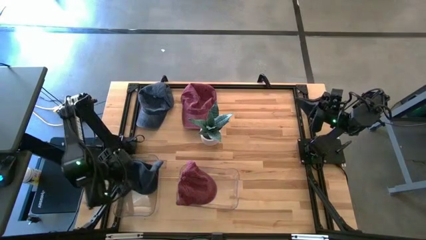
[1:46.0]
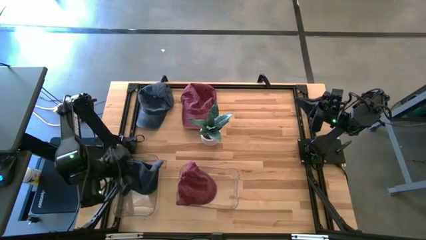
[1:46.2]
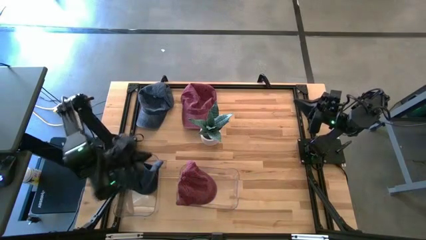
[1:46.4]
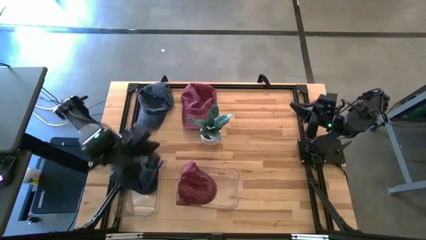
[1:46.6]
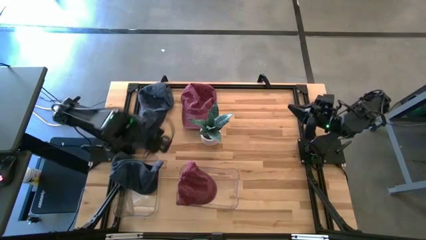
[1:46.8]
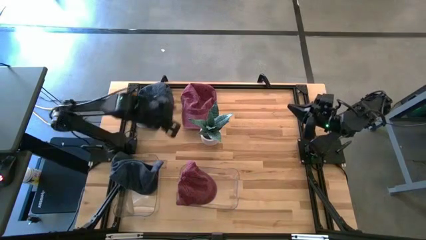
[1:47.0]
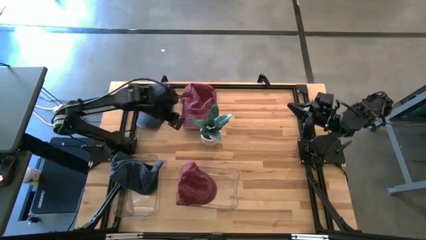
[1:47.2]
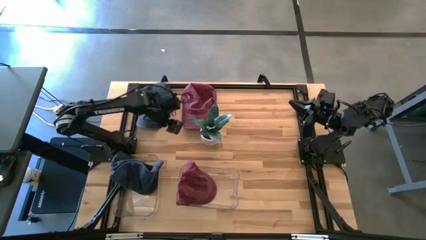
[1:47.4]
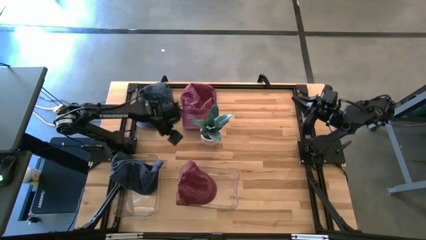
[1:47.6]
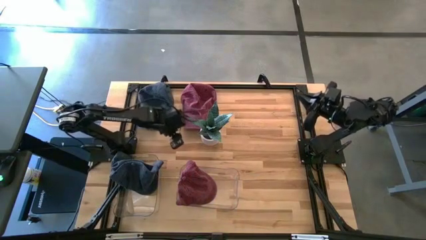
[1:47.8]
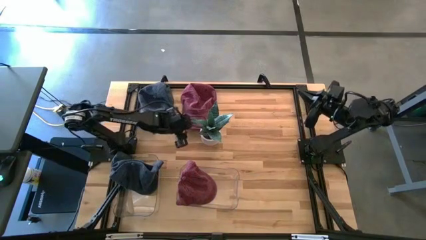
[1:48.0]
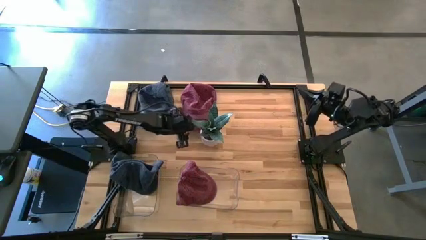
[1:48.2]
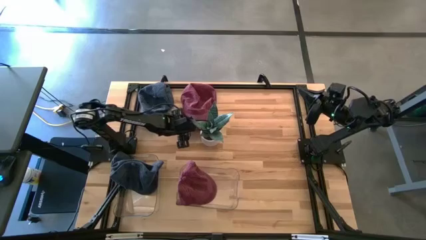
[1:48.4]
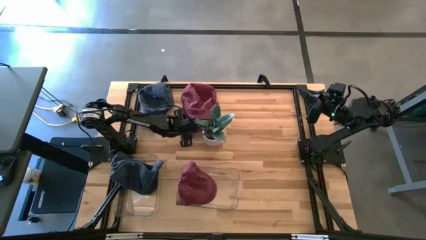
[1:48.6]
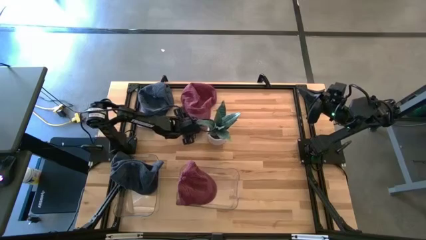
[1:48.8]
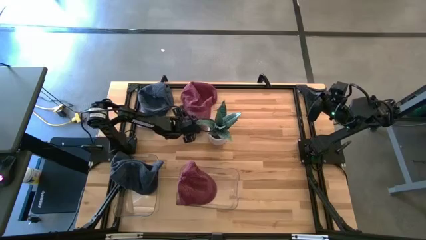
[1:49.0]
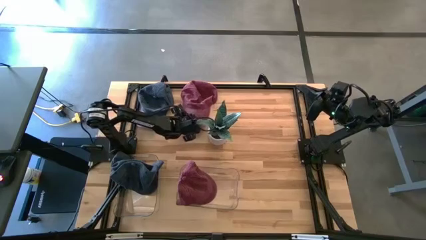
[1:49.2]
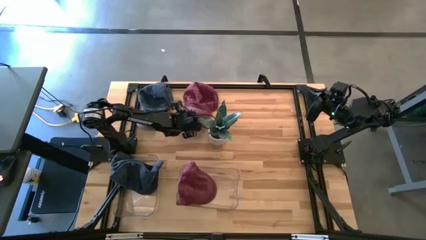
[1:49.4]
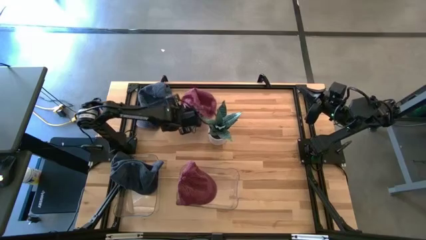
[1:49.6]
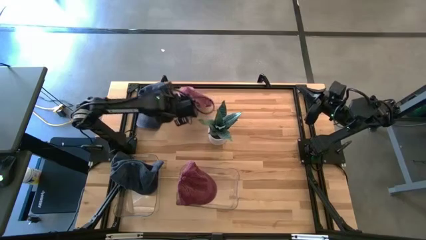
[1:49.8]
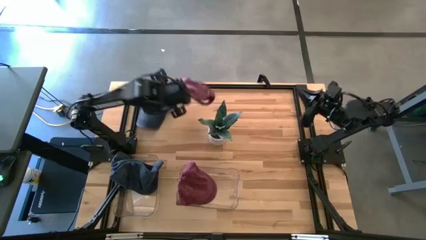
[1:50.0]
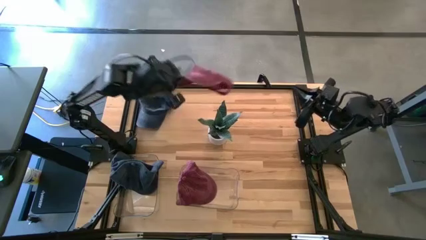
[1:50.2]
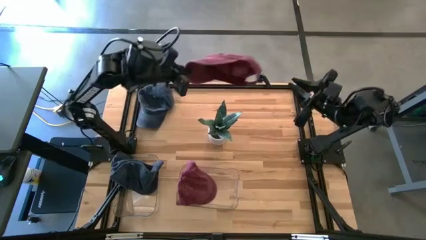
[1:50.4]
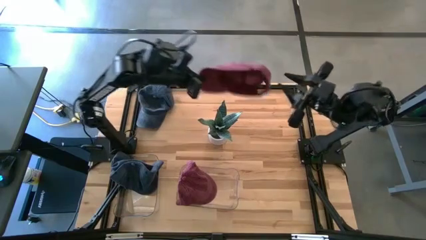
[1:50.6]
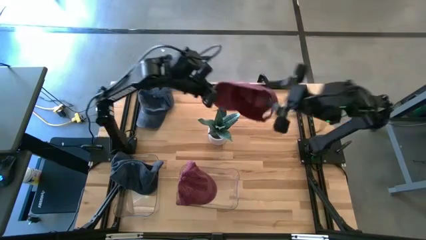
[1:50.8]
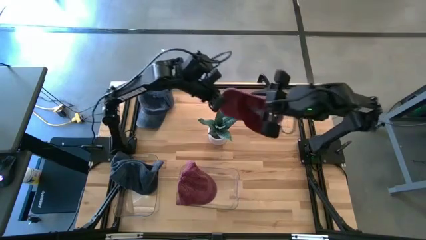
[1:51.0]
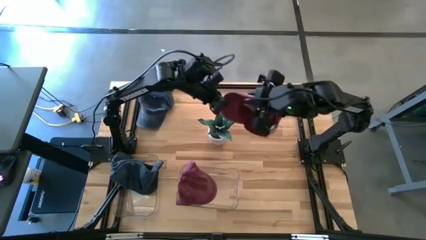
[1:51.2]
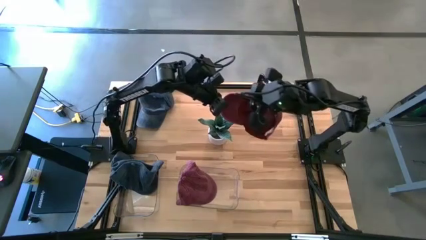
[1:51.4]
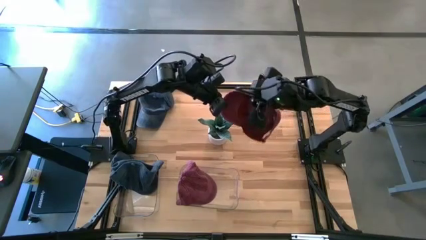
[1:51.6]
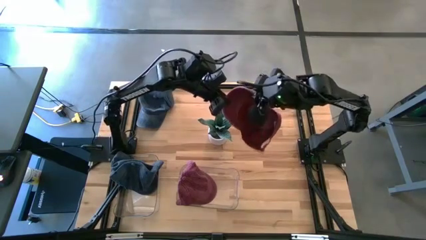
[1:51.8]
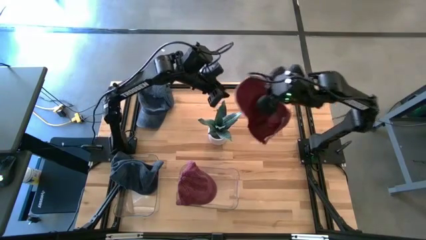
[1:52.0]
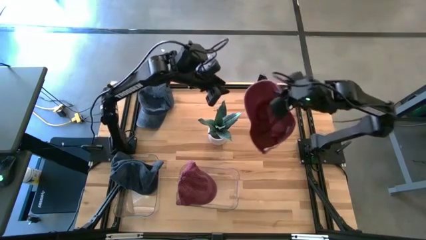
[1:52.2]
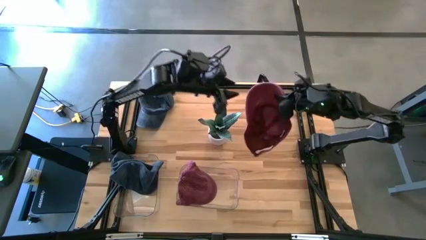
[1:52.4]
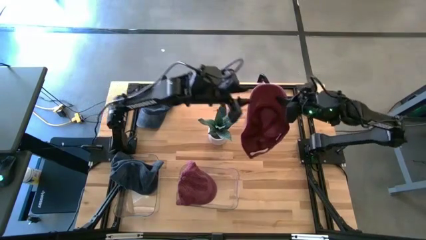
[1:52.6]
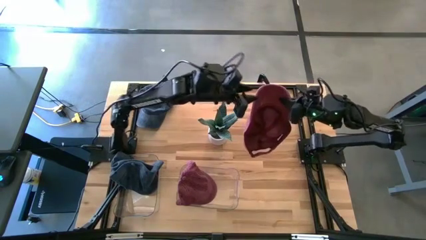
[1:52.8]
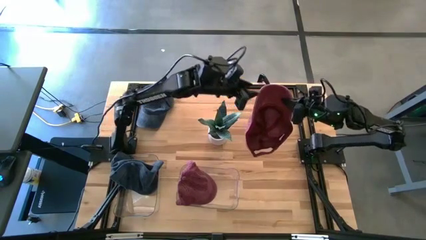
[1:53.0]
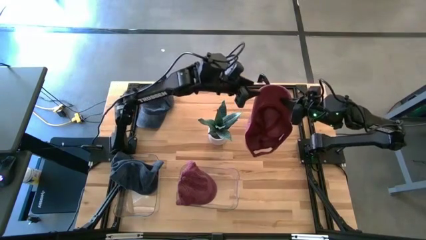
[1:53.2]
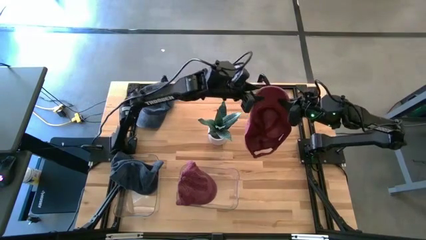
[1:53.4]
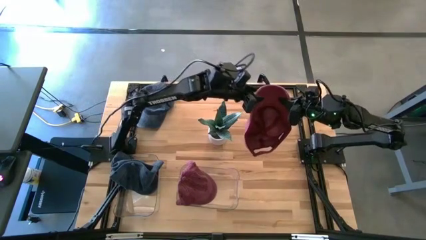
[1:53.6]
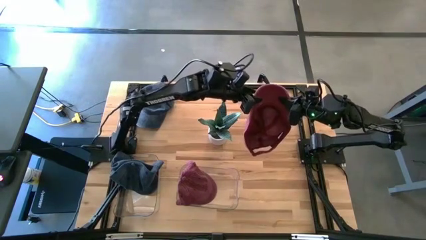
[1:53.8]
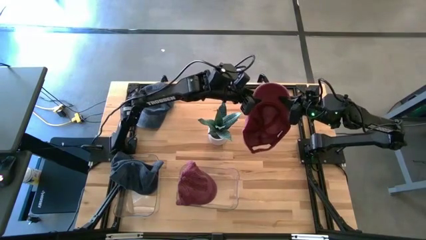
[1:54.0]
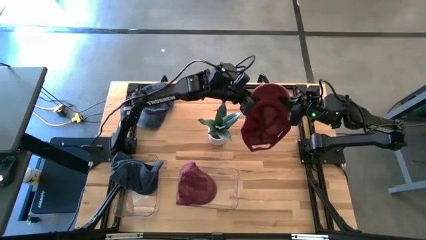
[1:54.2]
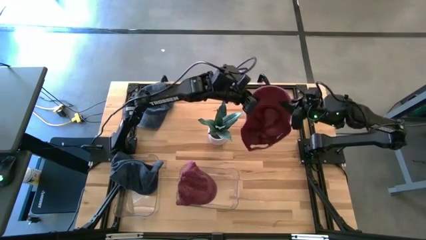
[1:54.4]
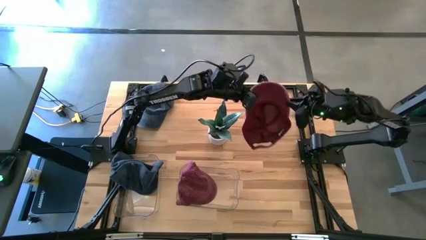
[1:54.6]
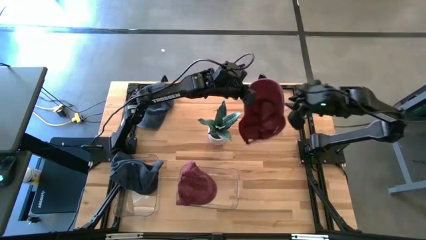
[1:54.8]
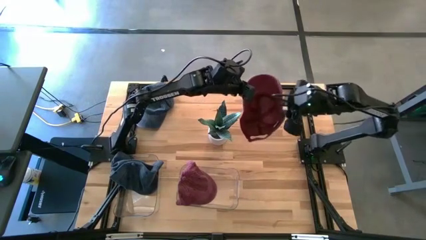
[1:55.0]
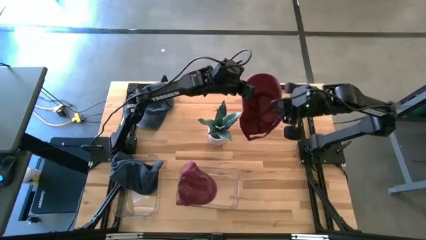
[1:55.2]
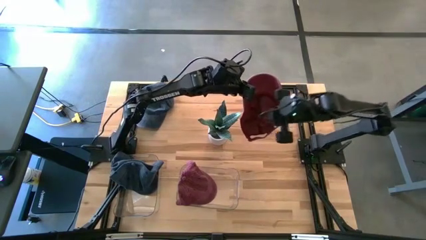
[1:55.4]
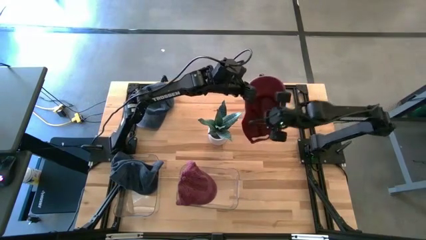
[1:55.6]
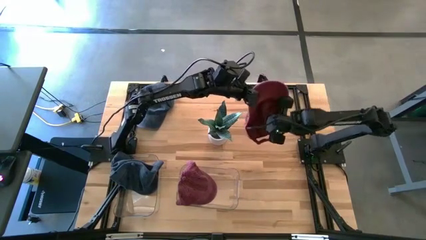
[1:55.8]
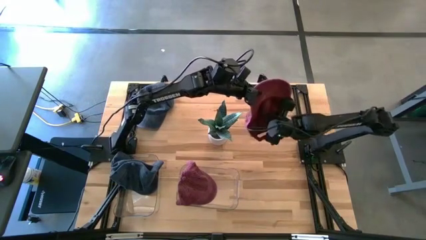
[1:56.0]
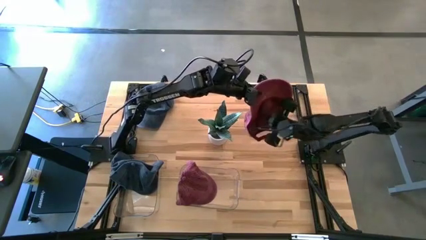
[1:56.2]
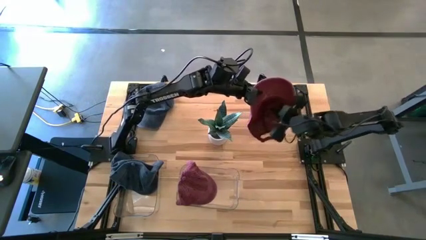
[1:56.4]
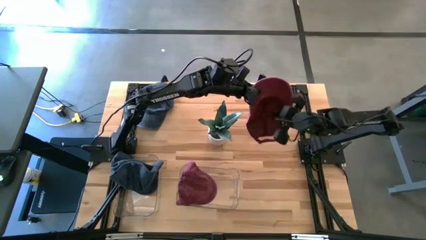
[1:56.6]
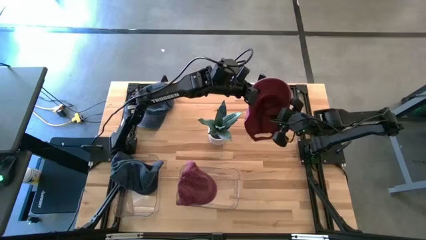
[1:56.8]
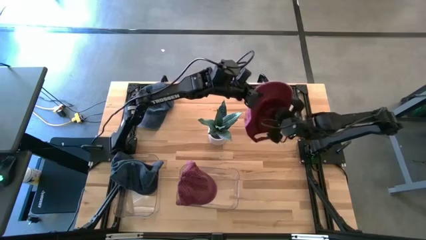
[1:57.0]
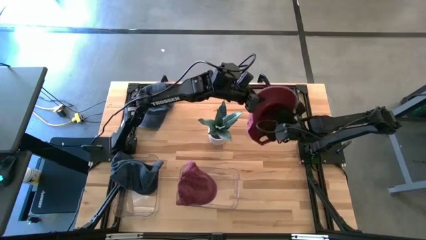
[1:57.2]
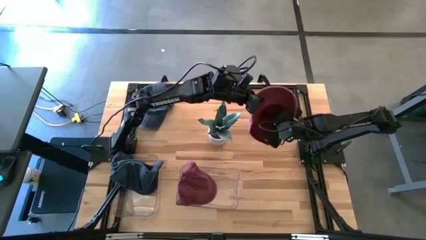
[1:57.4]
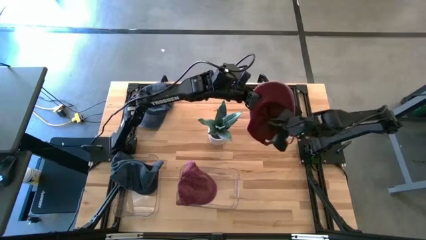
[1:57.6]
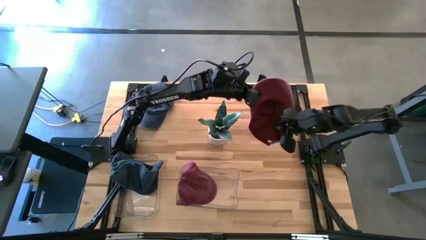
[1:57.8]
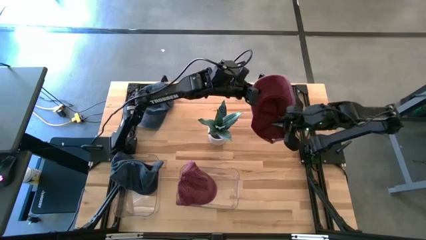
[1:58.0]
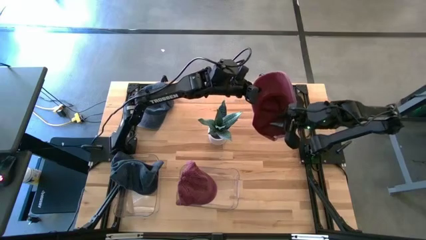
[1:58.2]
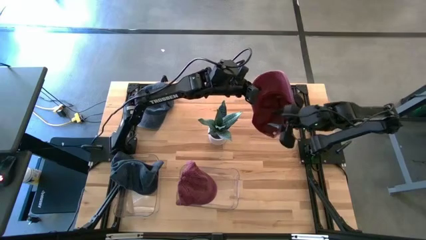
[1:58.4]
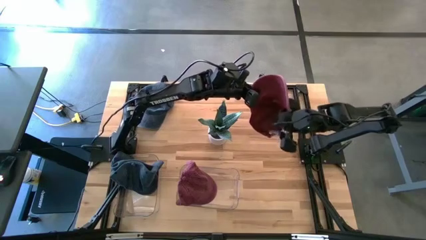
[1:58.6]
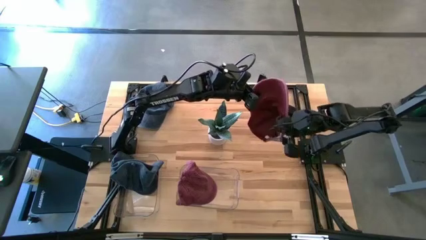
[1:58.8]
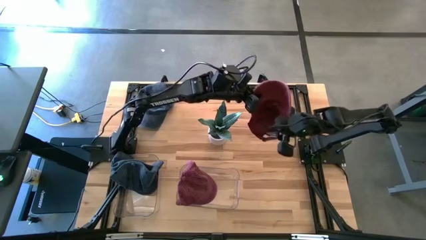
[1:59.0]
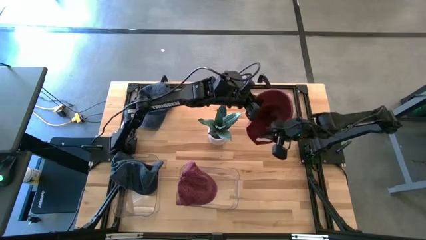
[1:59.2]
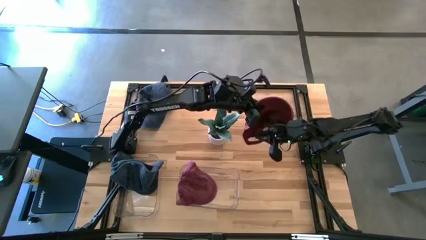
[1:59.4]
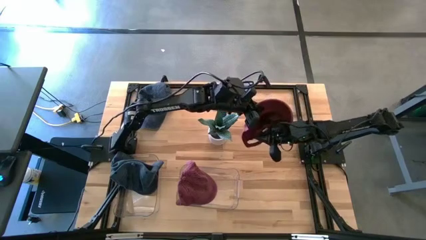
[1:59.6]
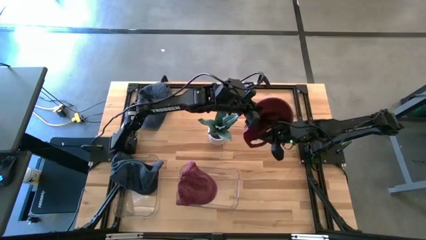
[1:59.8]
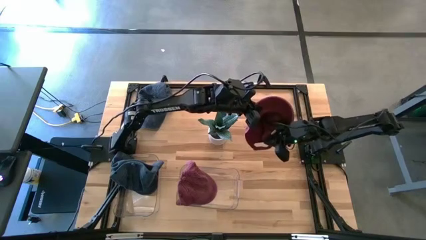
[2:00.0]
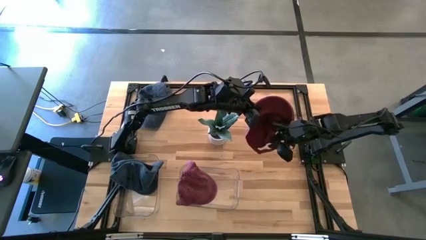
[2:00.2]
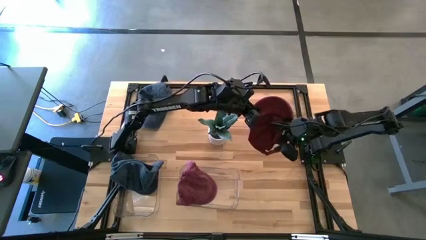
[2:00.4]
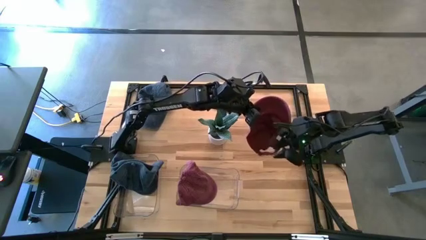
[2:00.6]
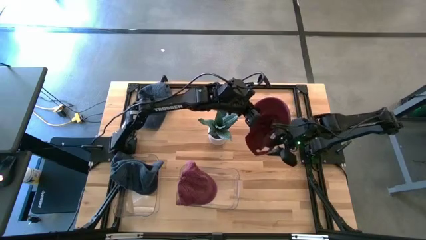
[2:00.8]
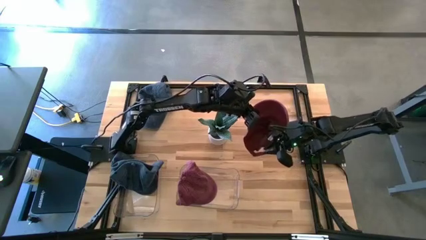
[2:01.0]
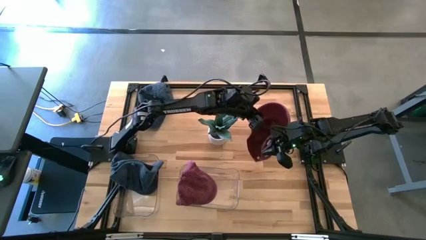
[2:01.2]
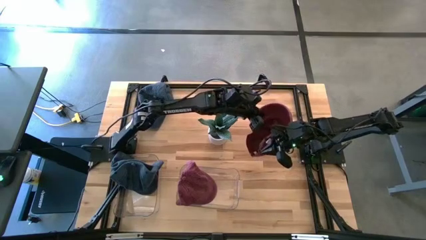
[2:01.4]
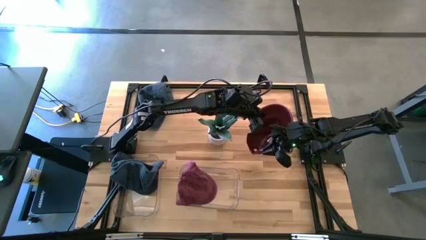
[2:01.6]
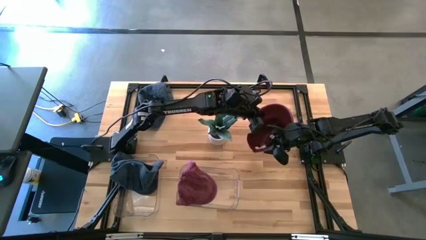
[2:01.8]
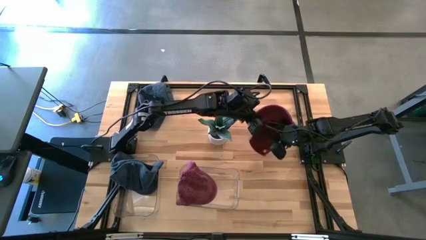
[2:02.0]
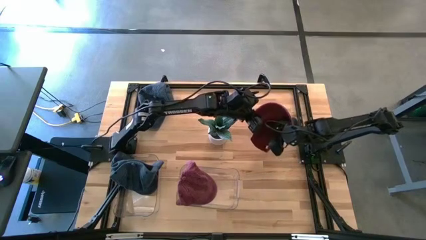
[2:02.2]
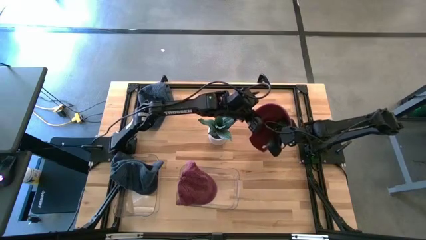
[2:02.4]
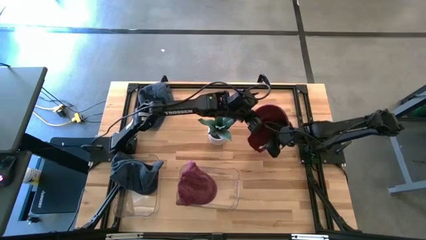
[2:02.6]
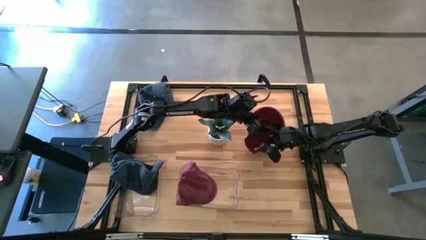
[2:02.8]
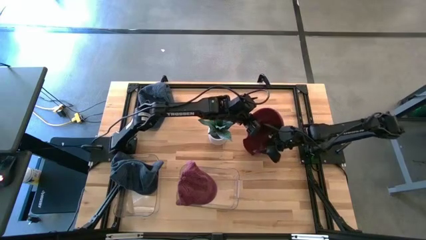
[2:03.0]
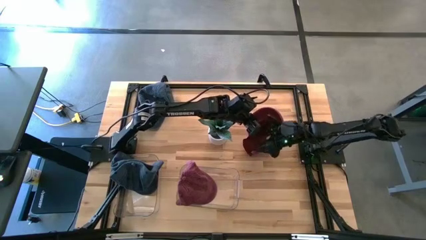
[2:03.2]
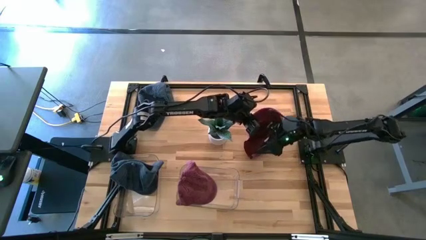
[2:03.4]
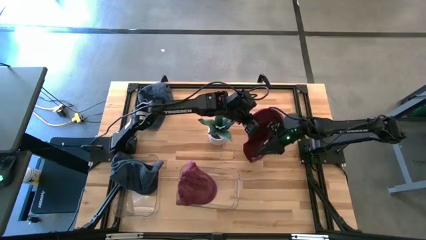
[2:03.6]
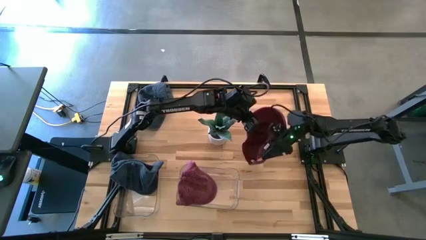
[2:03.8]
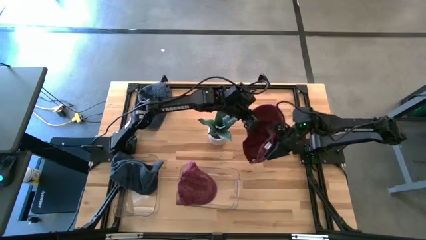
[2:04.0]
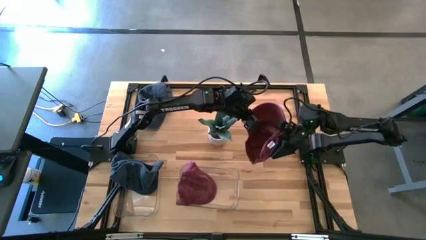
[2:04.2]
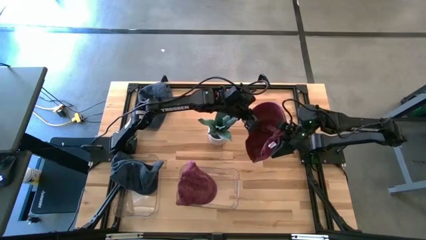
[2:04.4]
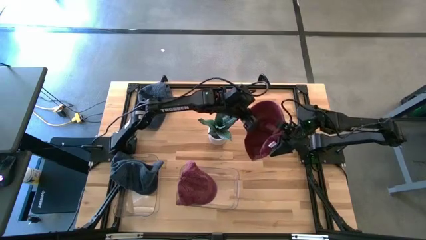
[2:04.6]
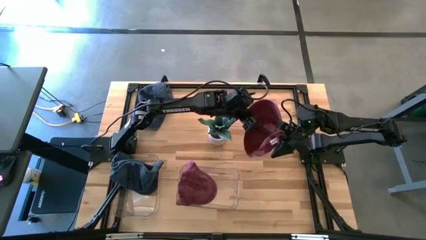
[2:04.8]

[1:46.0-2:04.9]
Task: Pick & Place hat
Put the red cap into the right transparent bin
